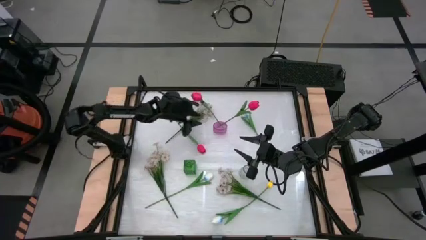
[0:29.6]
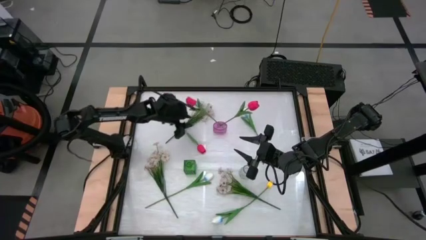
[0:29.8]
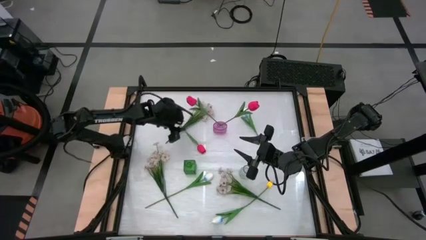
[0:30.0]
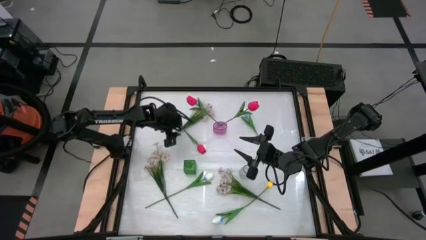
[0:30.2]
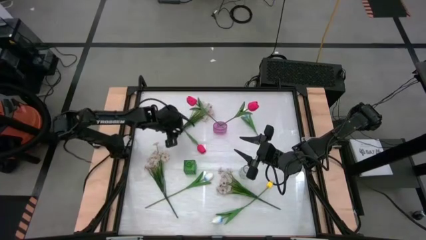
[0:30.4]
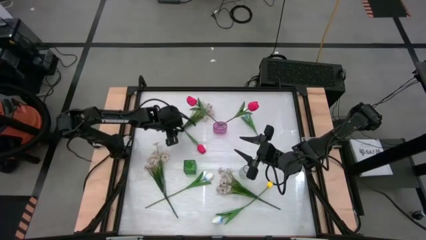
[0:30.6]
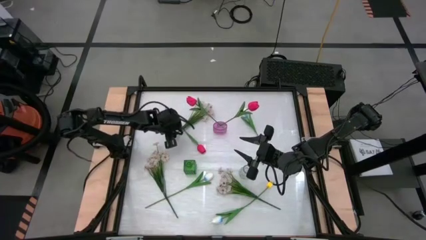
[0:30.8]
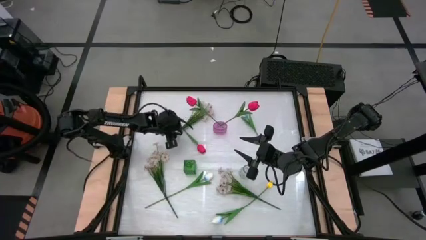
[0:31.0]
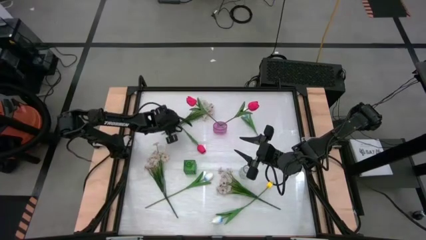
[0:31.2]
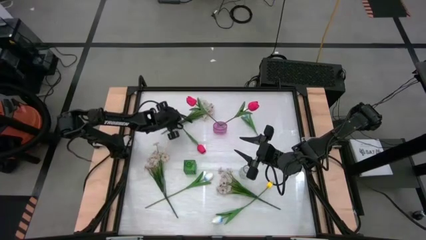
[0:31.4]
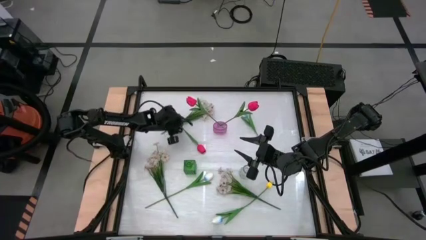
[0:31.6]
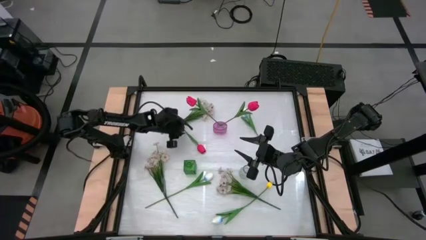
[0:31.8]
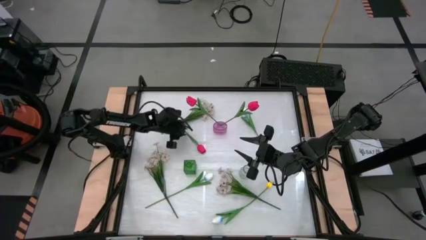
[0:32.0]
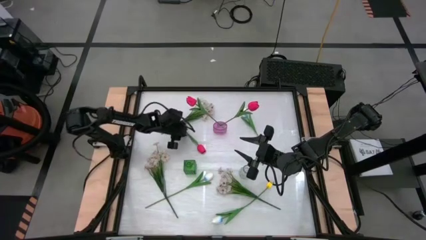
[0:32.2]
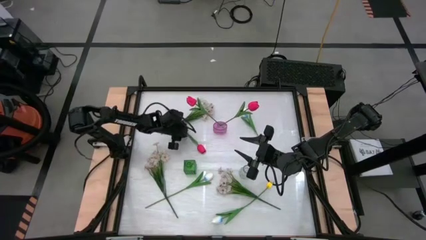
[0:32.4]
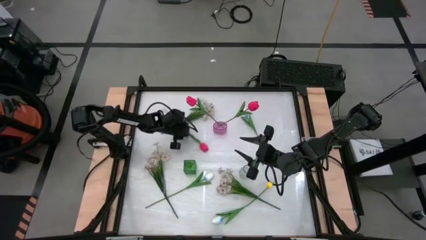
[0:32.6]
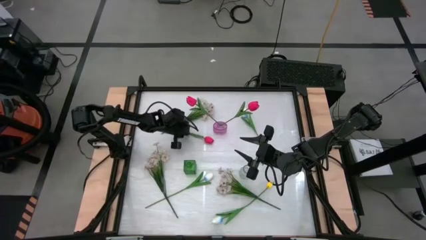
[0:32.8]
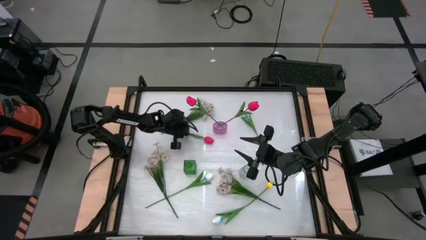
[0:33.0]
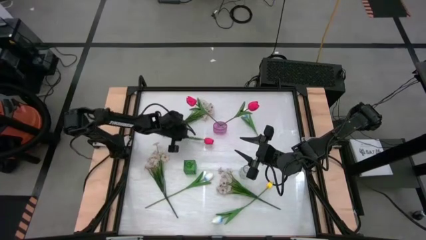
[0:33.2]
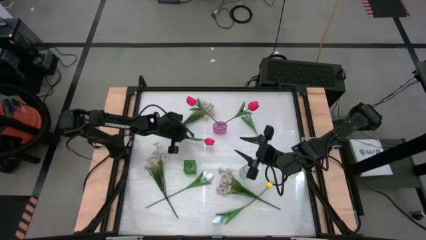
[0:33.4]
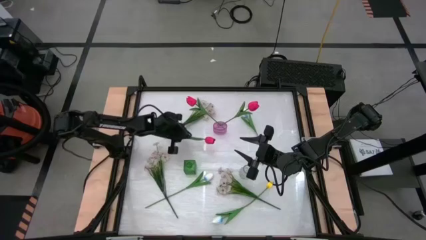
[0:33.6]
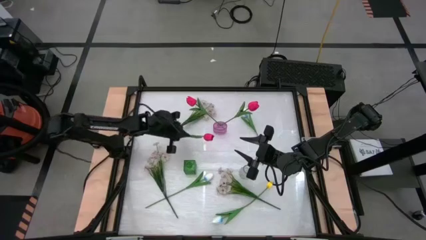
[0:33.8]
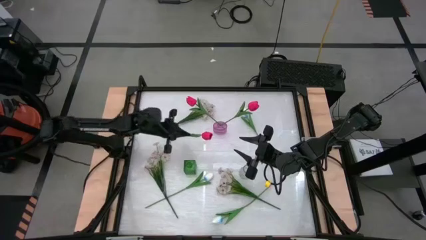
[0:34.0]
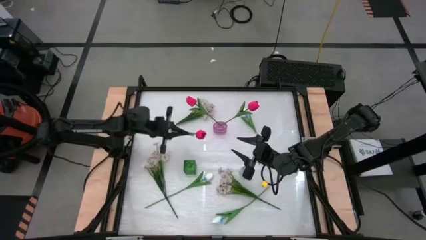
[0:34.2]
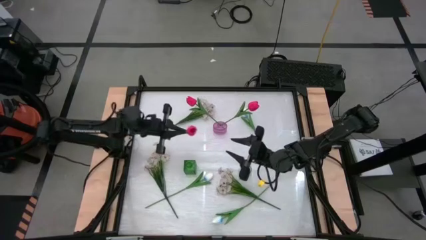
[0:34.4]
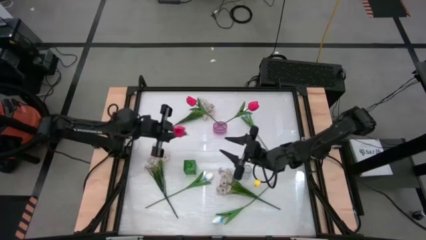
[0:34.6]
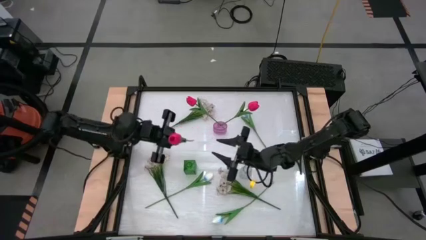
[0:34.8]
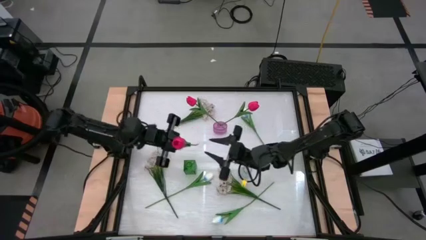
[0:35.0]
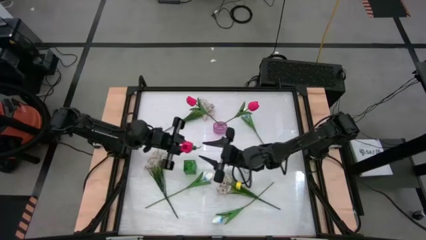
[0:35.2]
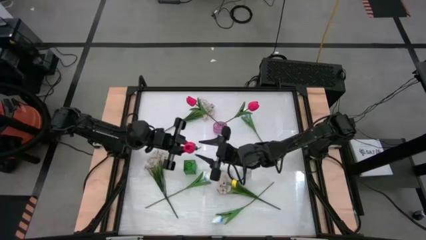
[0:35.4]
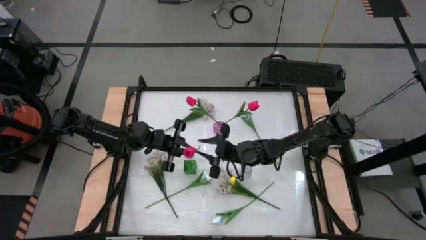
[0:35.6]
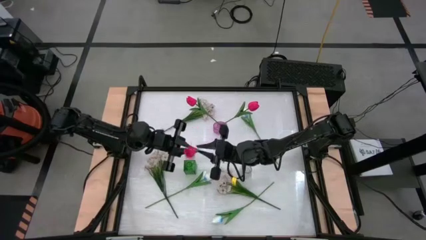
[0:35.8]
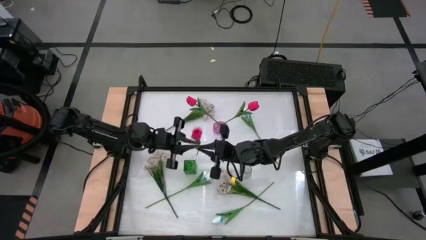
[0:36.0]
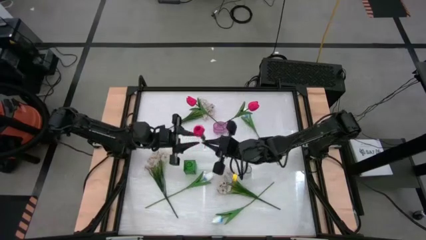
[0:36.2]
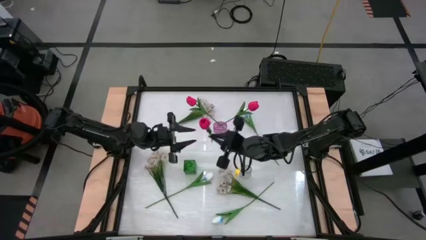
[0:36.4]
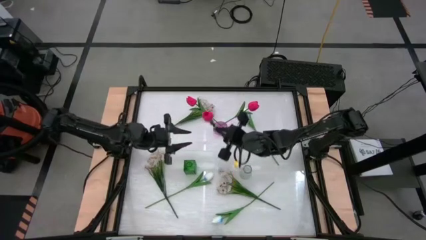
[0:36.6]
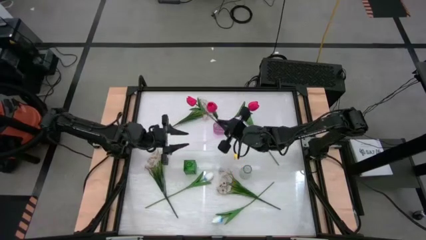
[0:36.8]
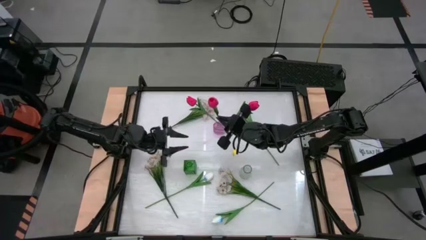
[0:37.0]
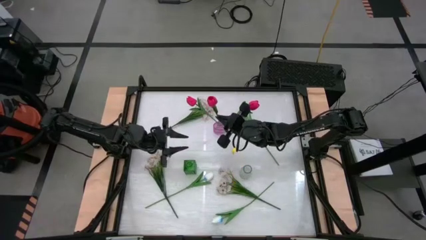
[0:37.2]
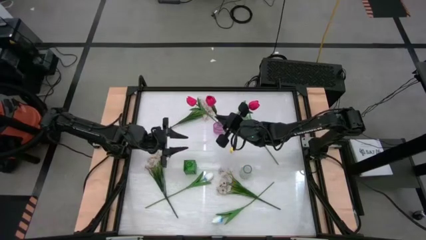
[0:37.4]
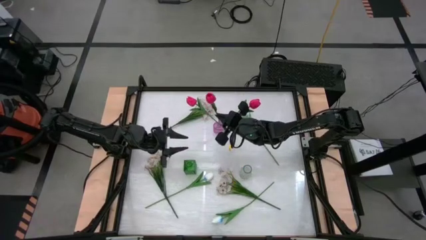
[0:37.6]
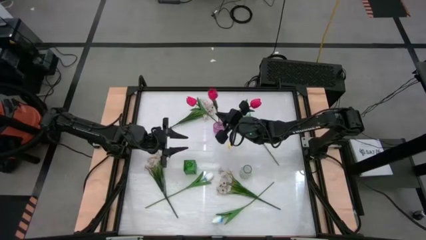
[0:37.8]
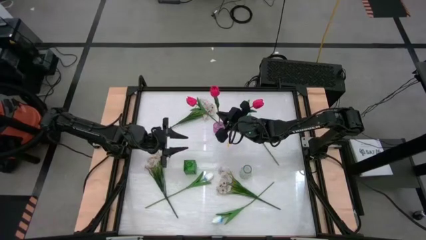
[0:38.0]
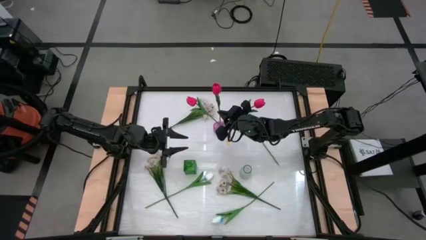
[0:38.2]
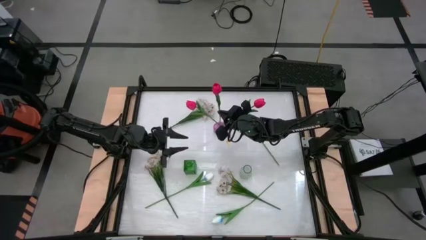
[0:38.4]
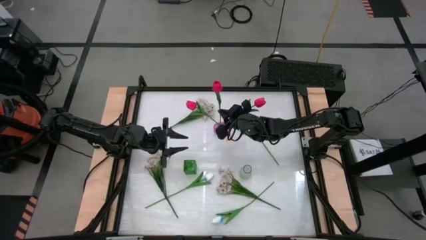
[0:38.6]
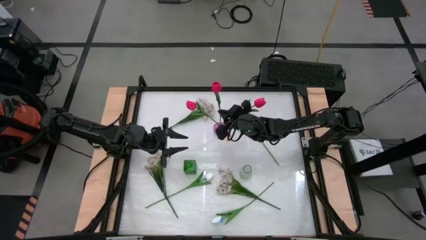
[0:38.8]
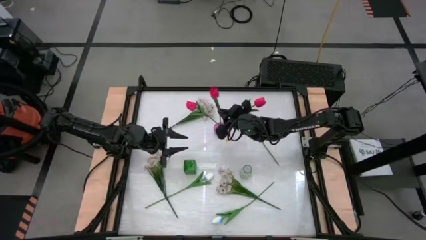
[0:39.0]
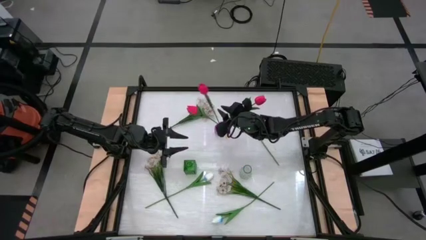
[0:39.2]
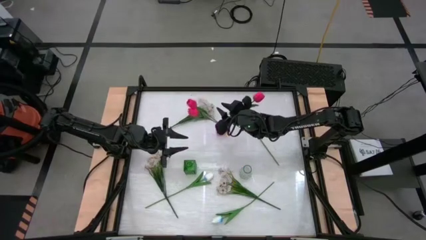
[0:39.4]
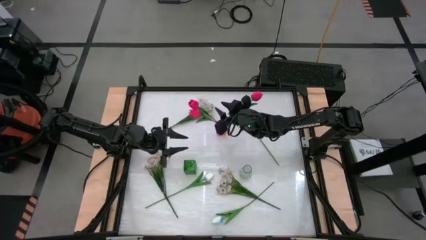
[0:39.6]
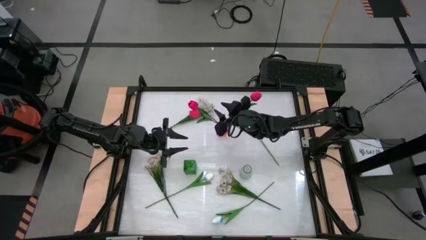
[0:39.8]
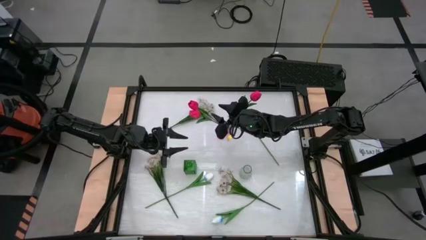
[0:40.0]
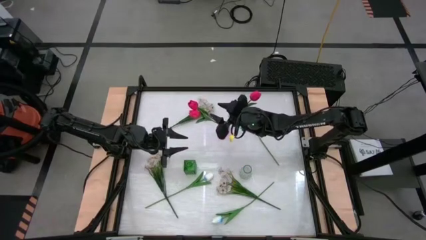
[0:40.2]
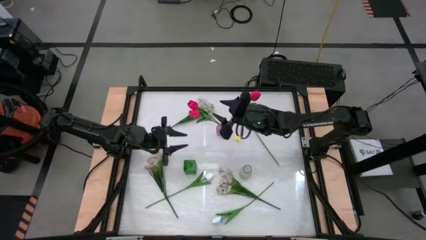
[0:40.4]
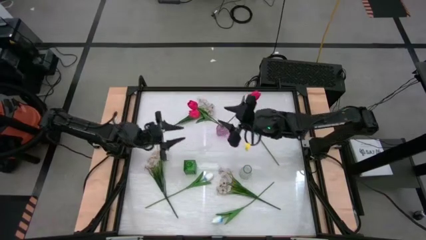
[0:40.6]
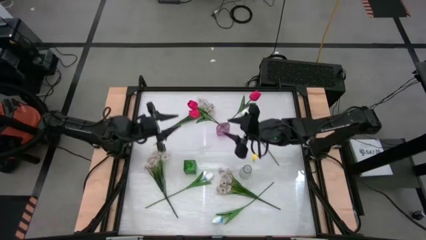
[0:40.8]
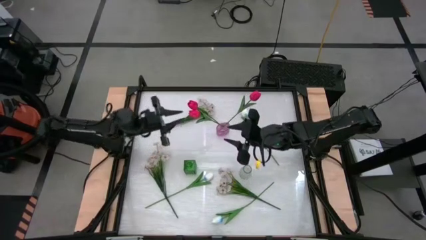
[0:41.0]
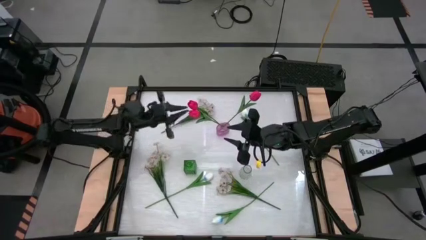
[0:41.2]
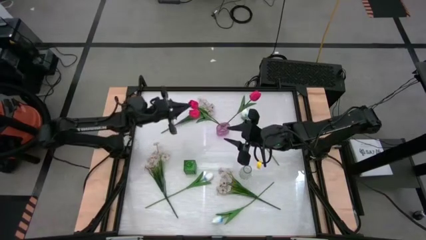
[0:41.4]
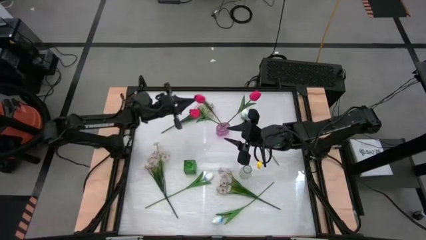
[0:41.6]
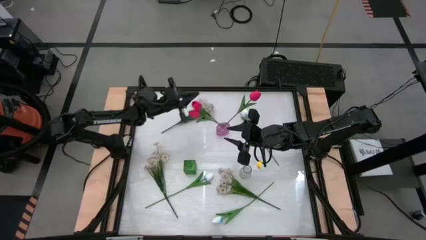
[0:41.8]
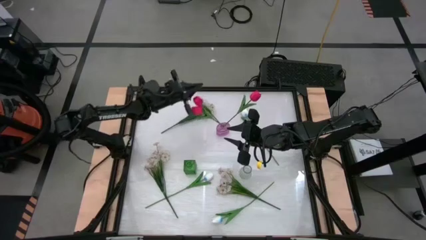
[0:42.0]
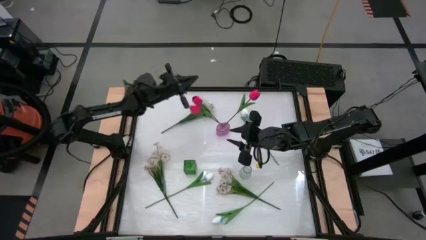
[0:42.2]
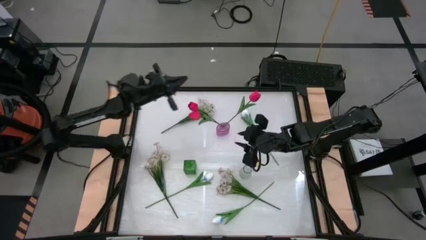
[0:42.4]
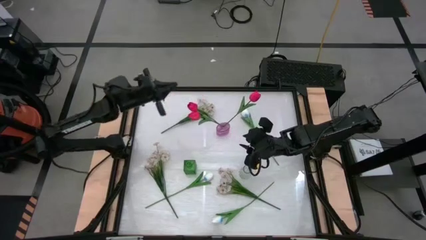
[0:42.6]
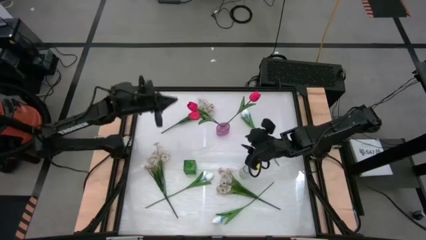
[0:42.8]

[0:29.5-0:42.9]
Task: Sort flowers into vase by color
Put the red flower into the purple vase

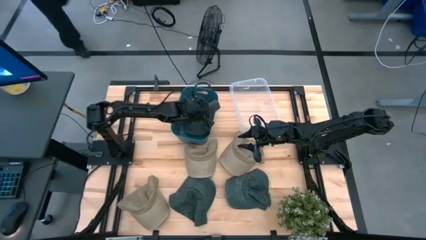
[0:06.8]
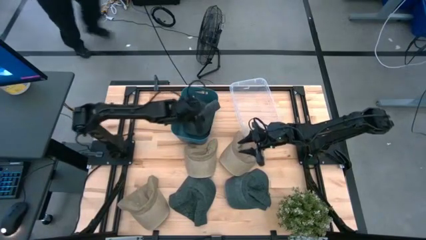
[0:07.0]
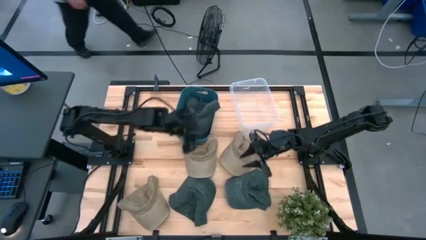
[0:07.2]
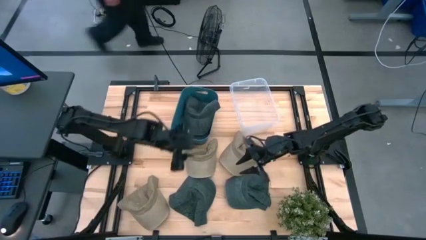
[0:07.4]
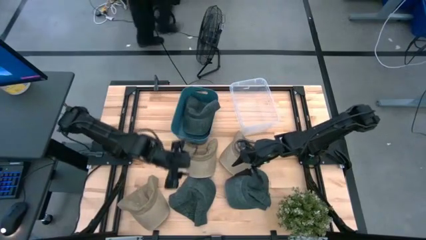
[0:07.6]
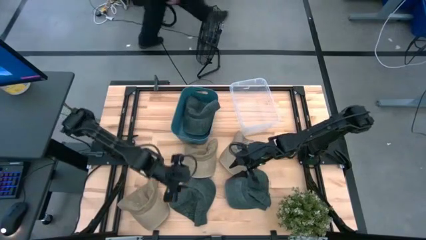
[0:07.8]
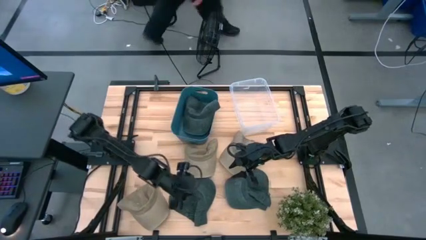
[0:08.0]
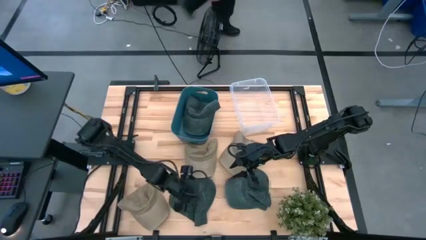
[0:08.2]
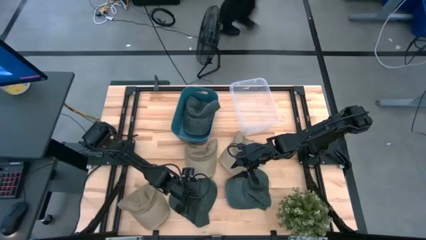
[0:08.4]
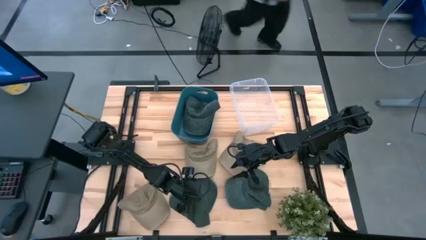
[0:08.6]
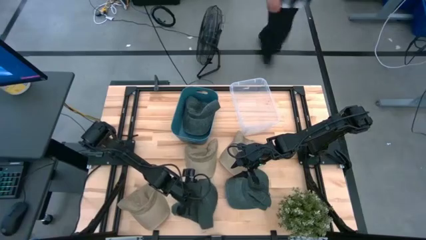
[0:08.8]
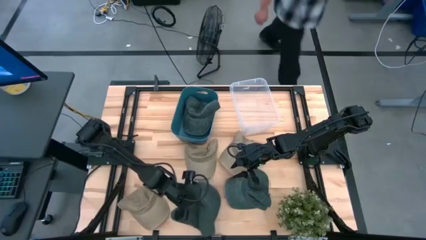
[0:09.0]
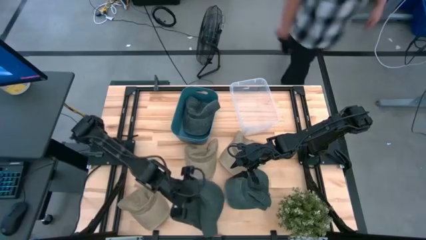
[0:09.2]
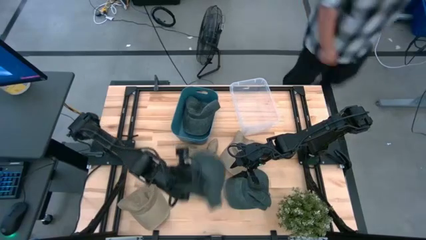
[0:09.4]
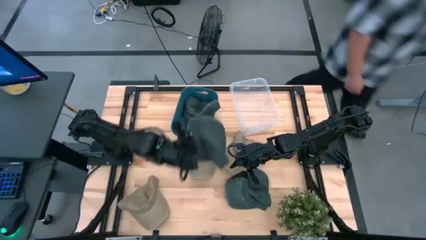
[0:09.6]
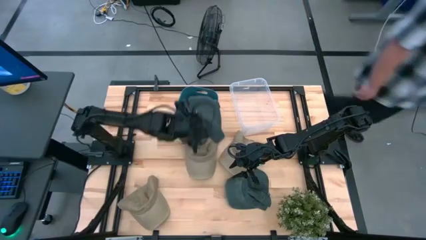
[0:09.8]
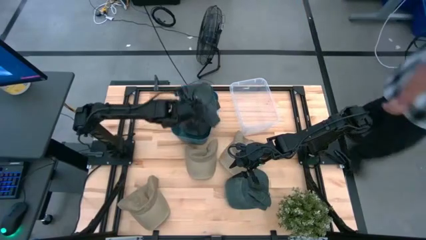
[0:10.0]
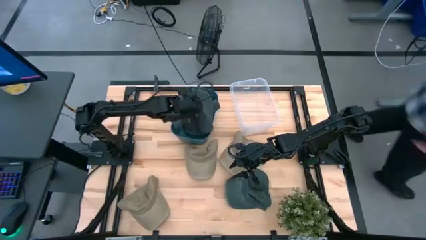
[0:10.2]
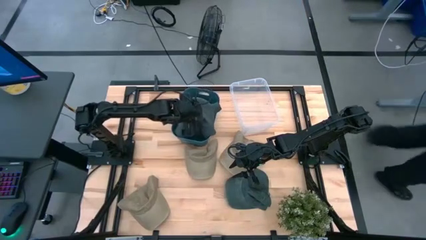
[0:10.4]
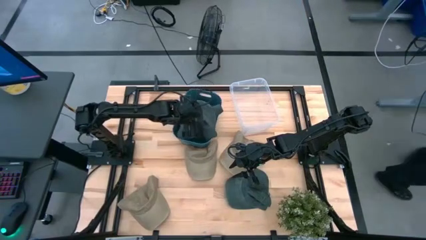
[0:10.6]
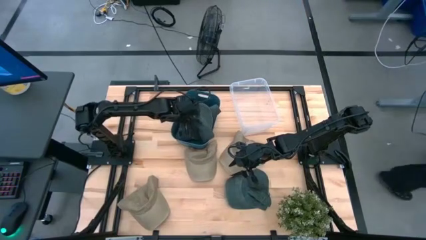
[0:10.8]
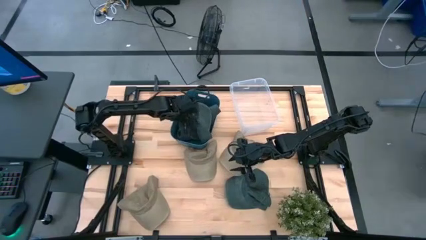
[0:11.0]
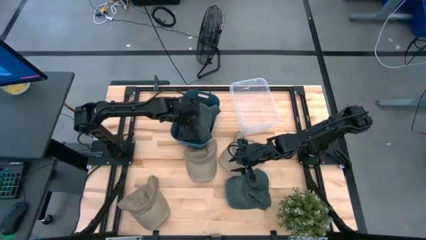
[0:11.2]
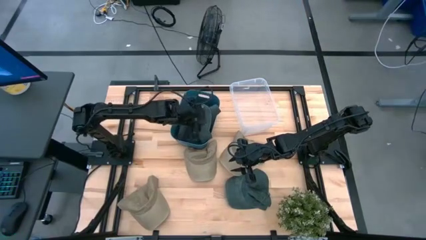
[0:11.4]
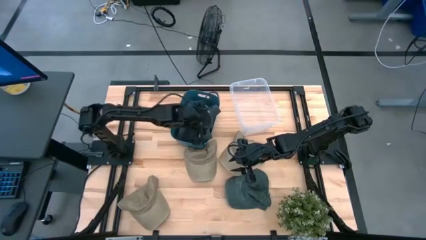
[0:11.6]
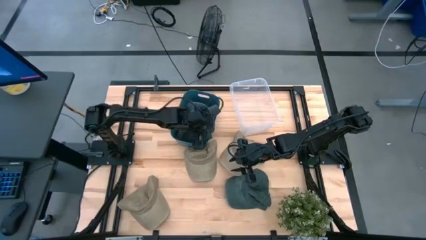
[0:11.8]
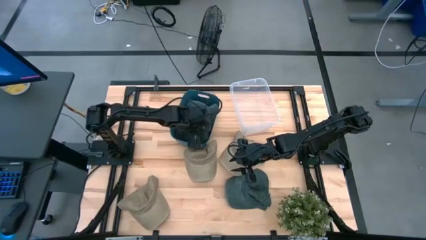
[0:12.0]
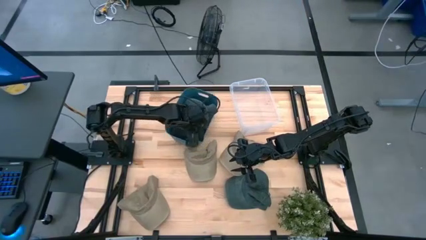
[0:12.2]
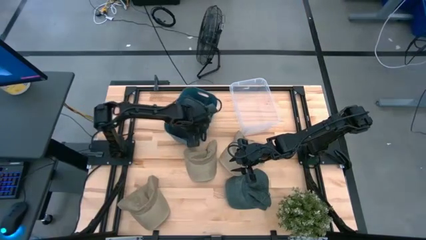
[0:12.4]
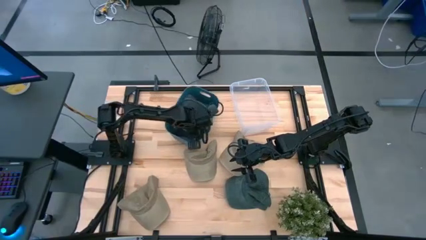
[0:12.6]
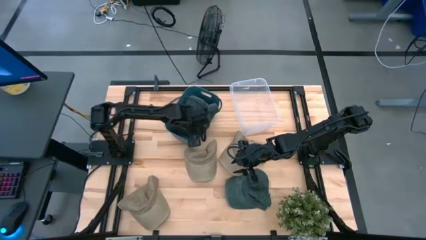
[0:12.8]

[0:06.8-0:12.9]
Task: Pick & Place hat
Put the left black cap into the blue bin
